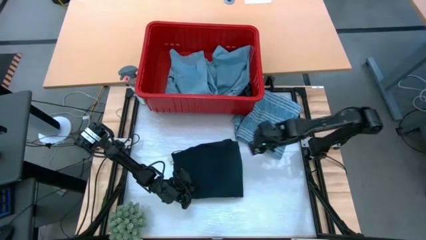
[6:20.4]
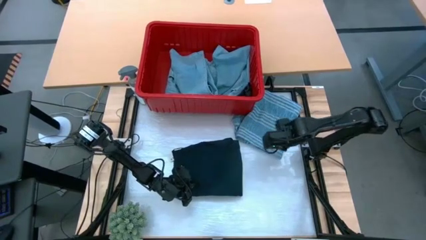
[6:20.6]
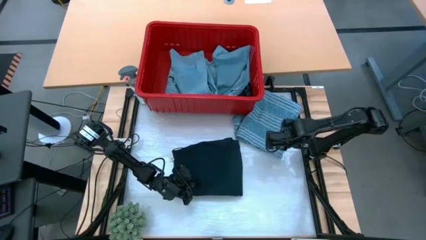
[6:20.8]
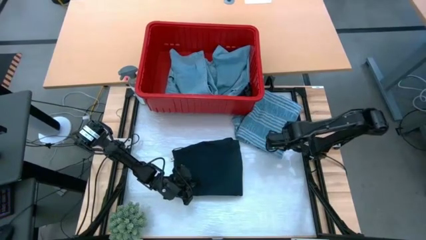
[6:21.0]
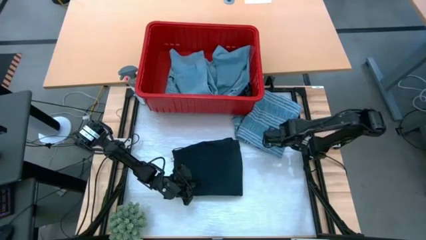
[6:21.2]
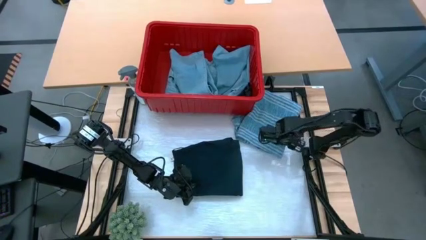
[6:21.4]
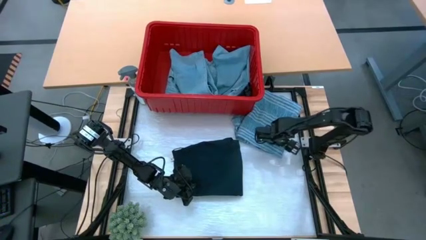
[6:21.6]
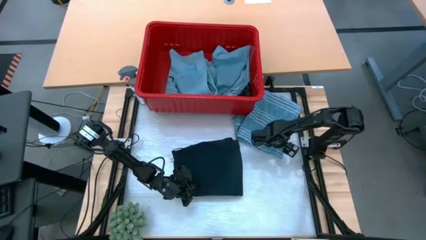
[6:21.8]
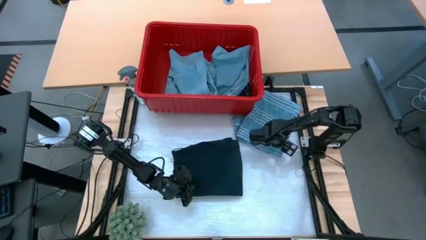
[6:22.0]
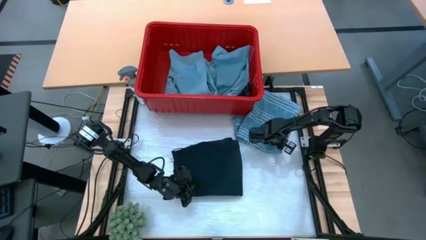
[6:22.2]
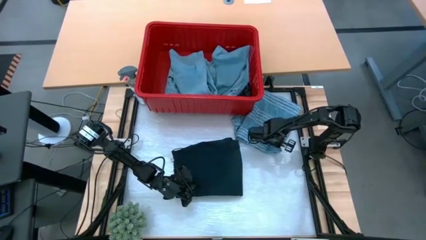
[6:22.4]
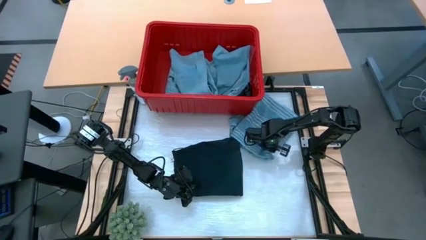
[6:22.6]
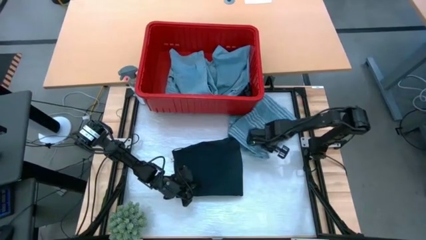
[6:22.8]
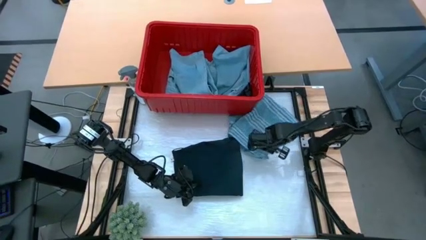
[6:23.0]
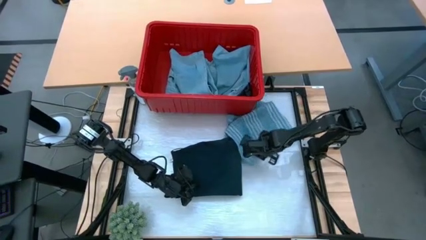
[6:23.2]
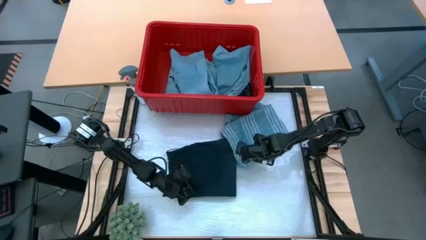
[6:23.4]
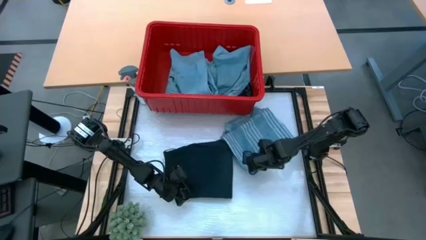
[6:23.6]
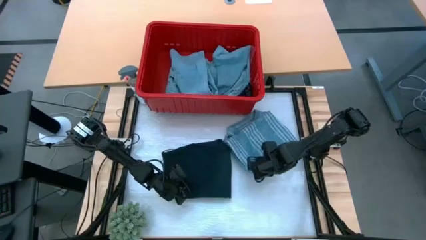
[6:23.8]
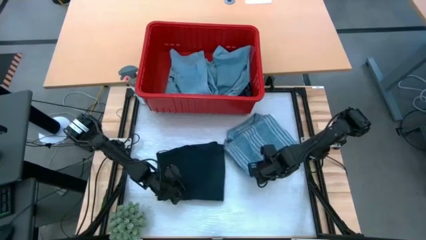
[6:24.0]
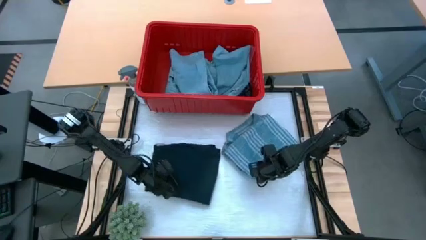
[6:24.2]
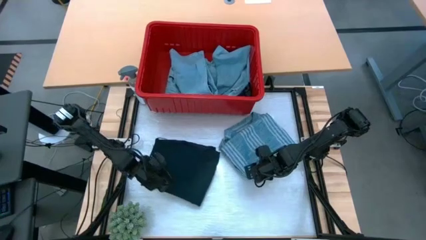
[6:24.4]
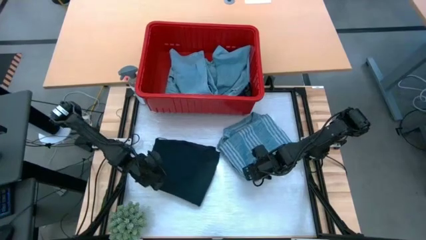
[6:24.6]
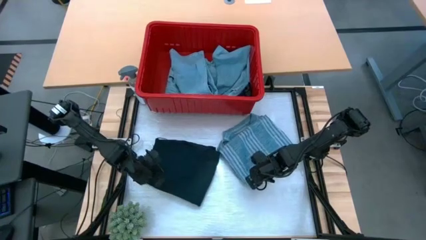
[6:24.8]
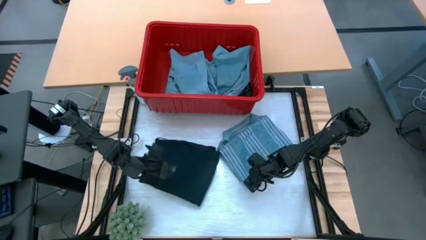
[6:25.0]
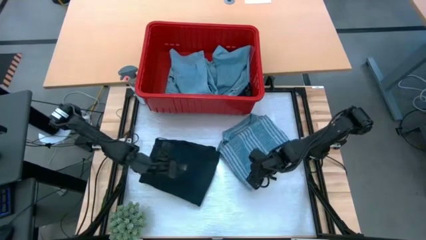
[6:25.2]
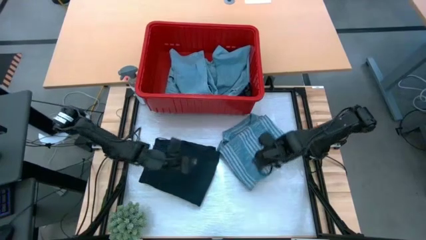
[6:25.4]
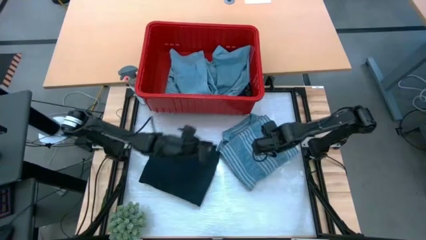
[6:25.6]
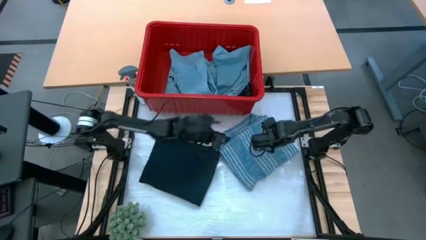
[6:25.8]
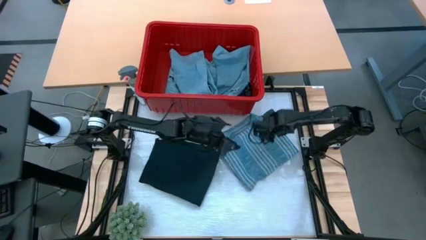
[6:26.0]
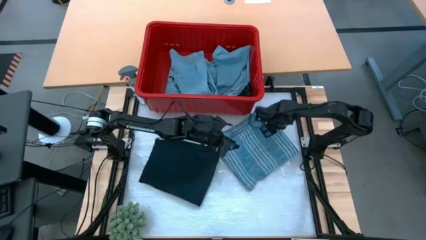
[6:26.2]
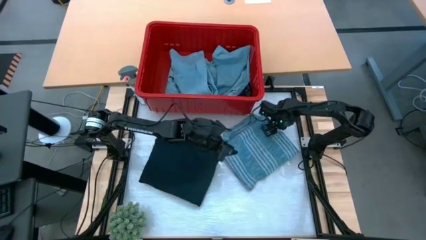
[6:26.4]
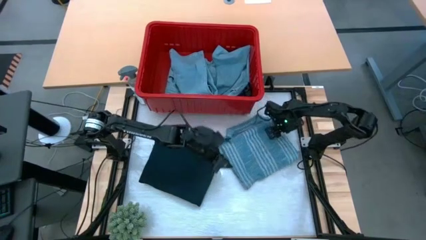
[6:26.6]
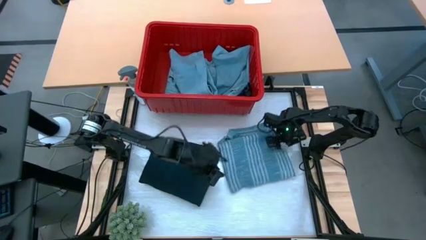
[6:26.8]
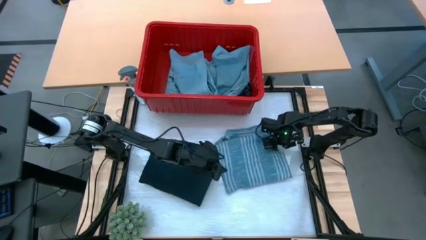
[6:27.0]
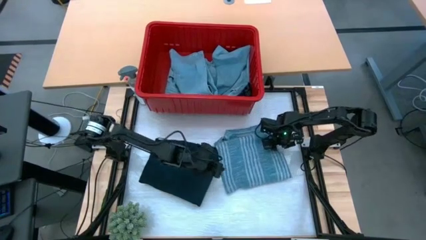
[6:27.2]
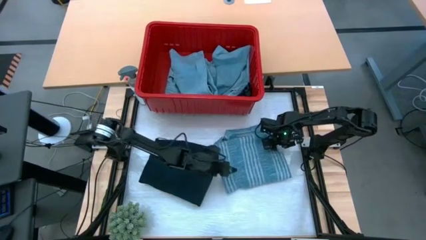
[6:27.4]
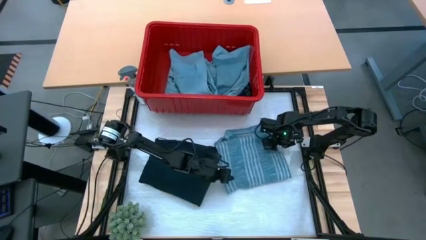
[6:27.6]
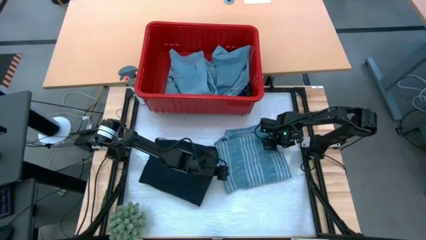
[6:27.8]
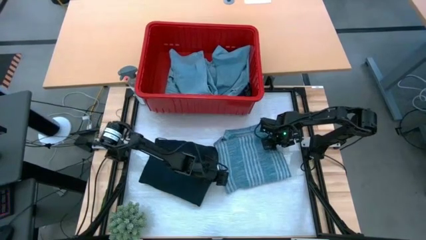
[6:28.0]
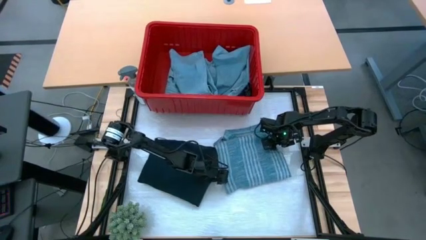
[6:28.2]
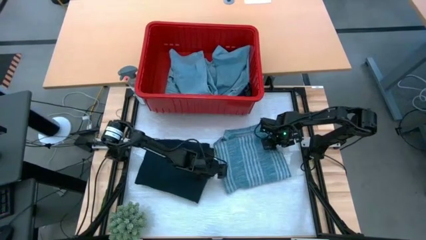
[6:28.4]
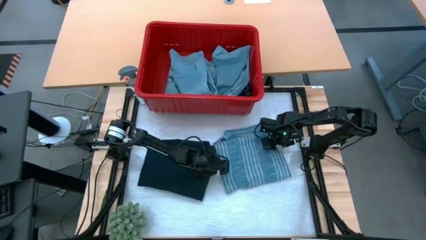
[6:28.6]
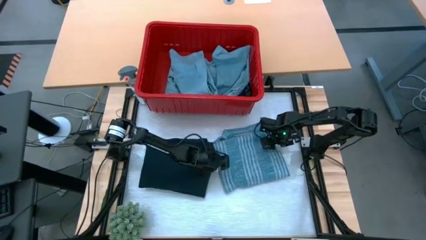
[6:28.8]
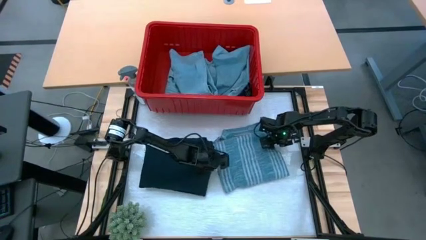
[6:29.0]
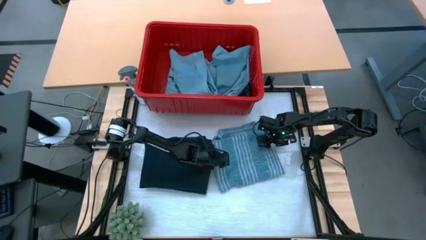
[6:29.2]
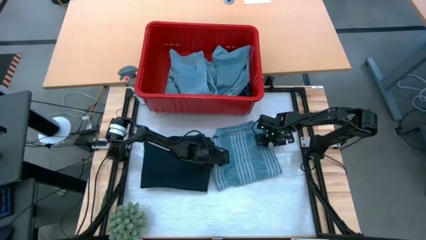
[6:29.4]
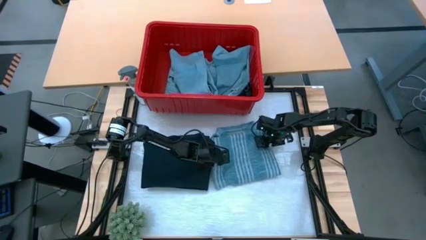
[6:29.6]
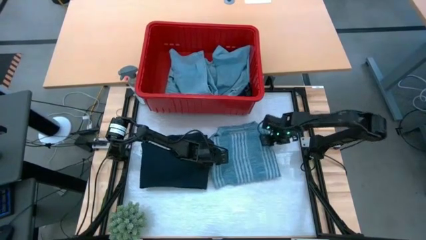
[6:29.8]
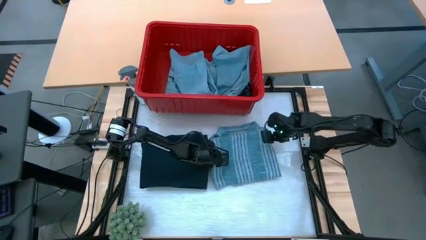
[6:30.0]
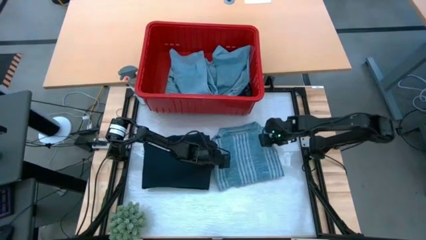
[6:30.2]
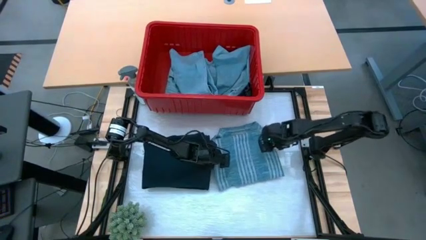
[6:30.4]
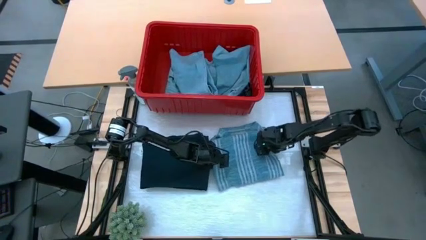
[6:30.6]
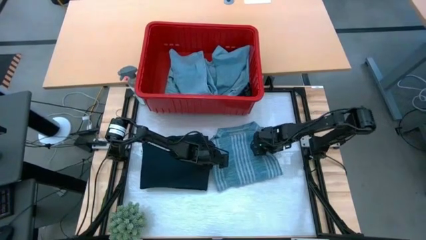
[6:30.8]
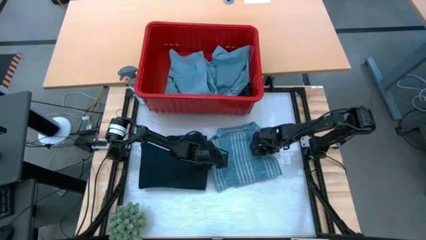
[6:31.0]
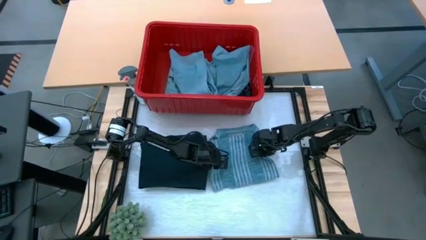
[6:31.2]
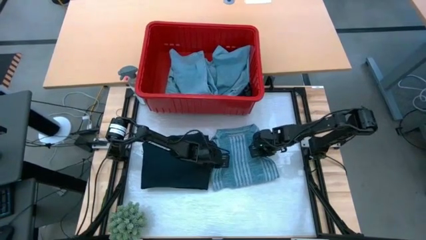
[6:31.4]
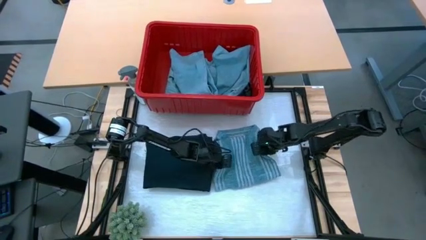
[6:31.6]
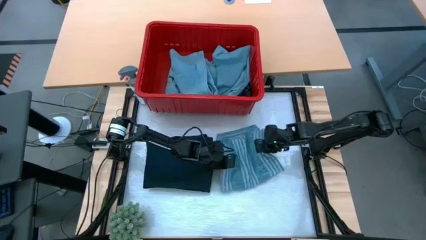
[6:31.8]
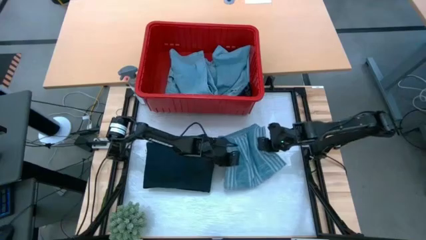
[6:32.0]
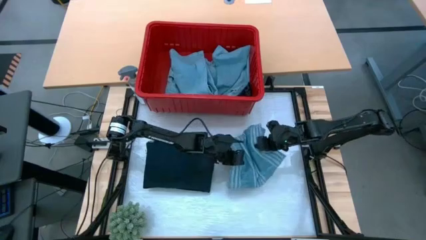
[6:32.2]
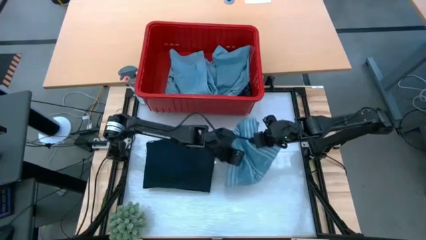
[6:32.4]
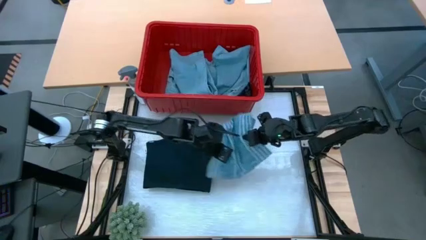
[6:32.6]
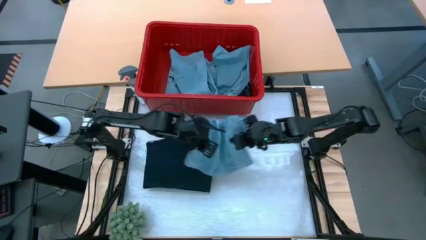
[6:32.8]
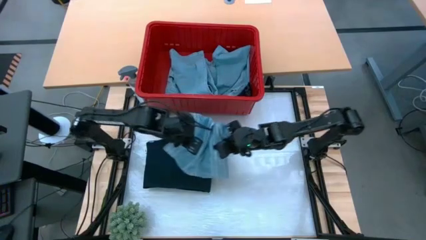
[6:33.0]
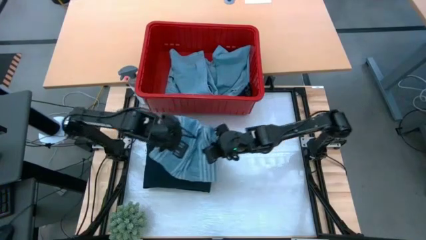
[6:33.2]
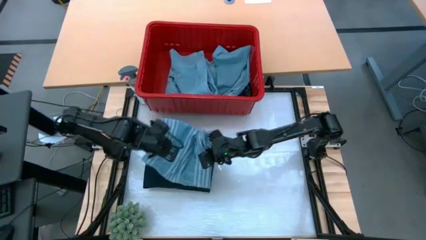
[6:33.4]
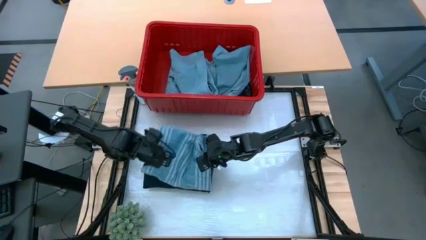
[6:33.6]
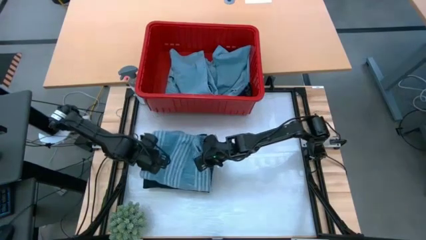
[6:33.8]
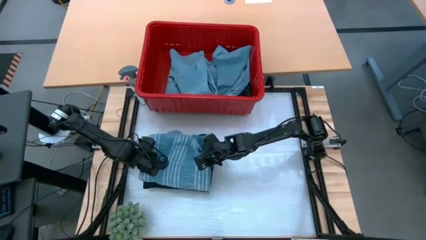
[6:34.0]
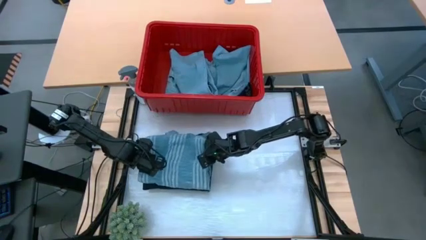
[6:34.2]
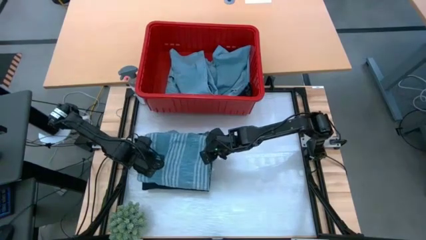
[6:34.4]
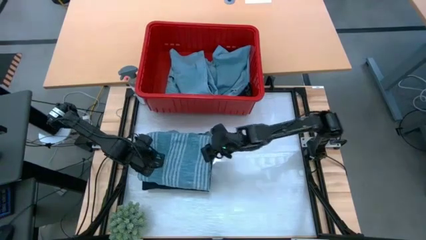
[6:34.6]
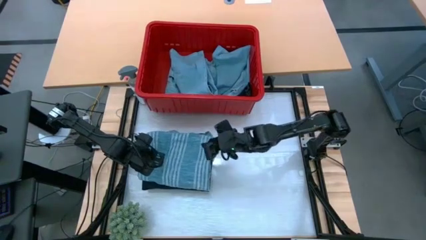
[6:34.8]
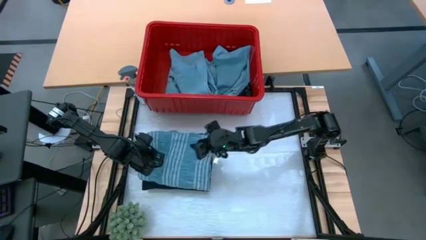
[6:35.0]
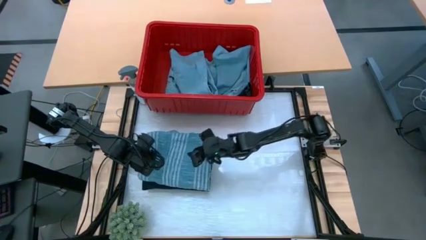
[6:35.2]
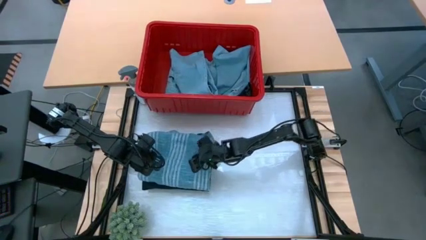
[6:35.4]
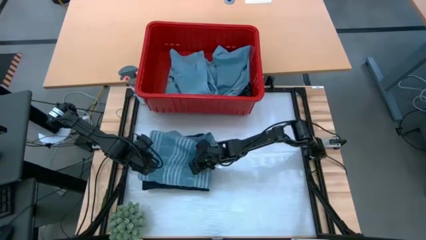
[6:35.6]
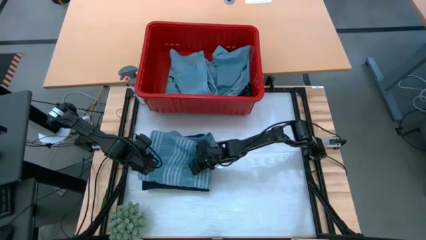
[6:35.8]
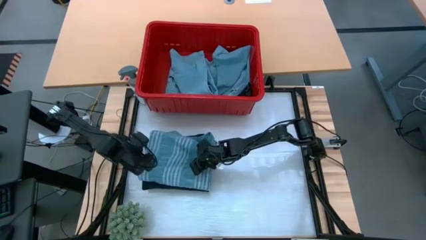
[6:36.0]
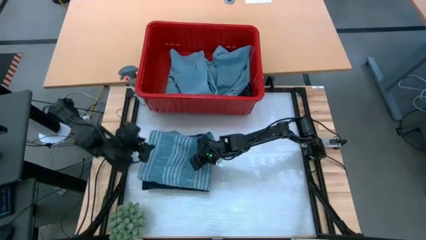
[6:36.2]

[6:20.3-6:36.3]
Task: Fold Laundry from Bin
Stack the folded light blue shirt on top of the folded black pants
